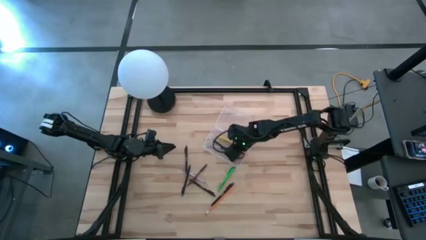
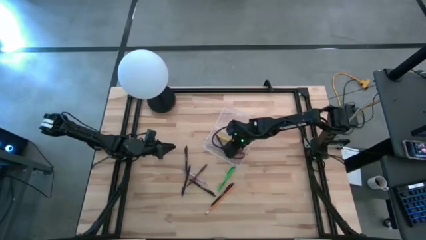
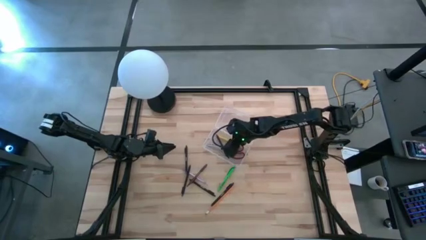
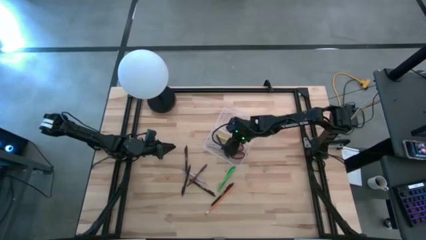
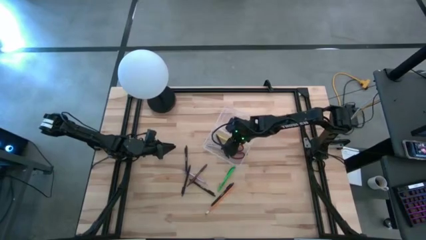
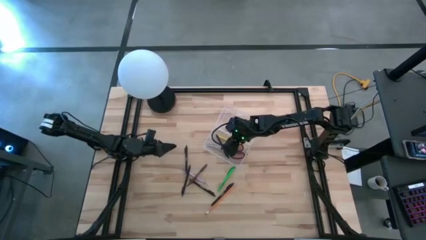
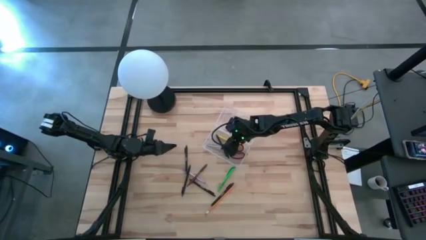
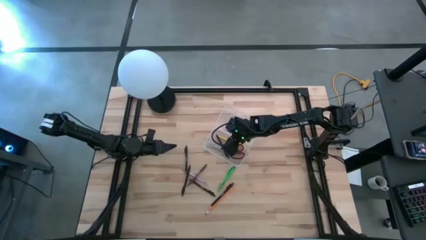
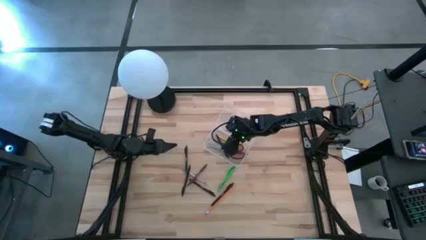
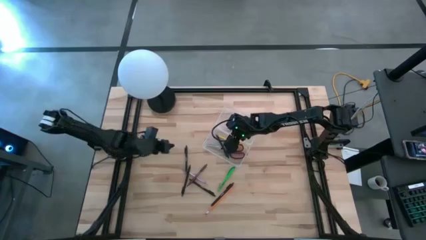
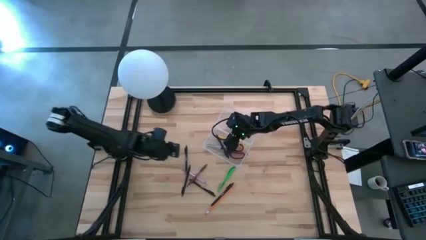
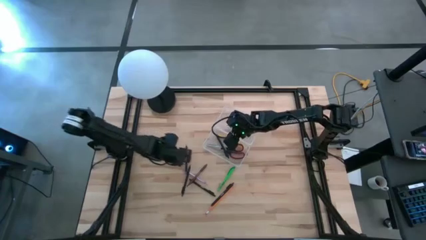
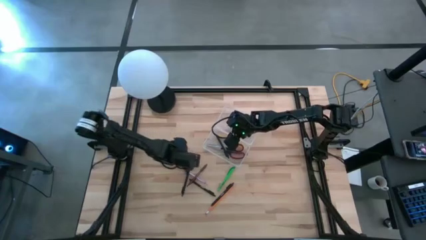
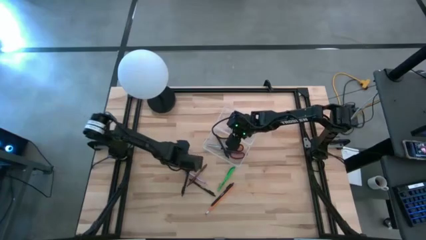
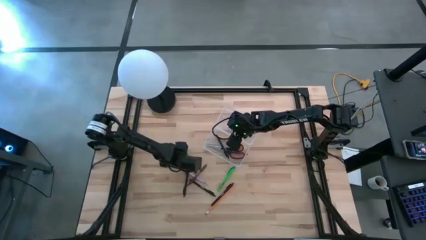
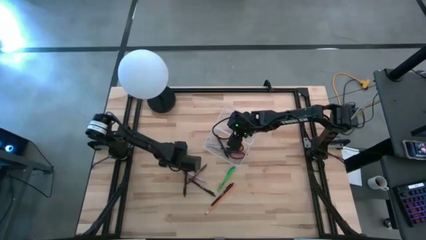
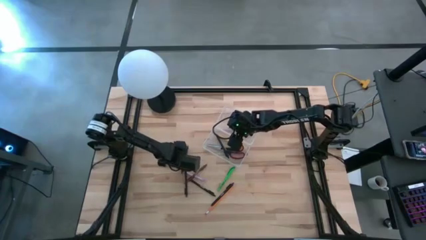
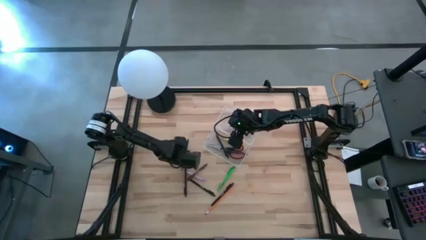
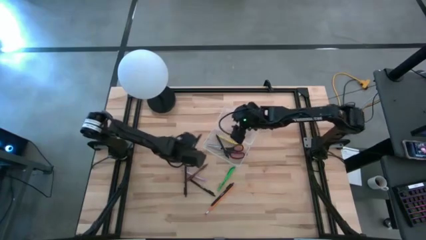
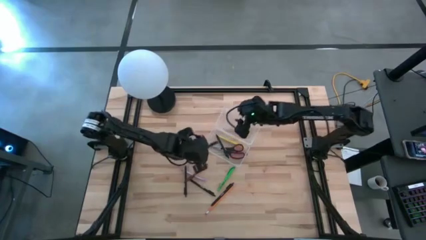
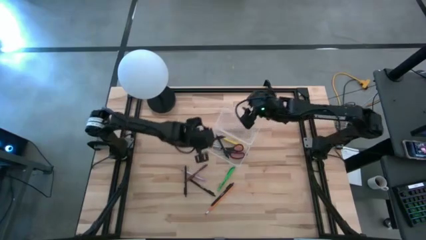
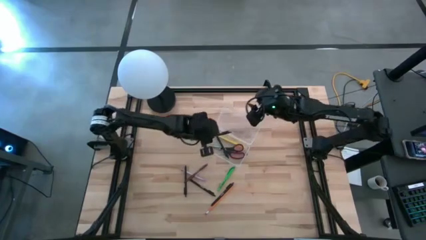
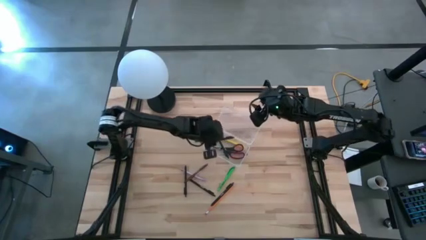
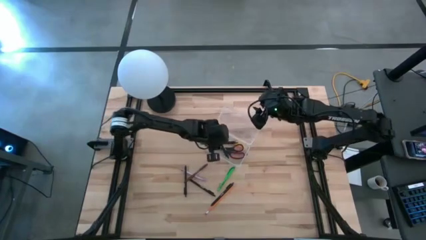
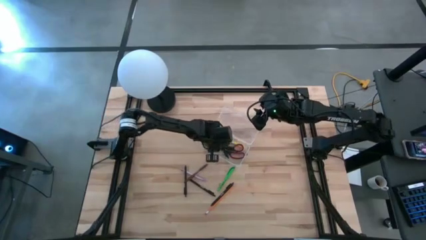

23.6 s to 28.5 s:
Task: Pick & place school supplies into a supply box
Put the black pen into the supply box

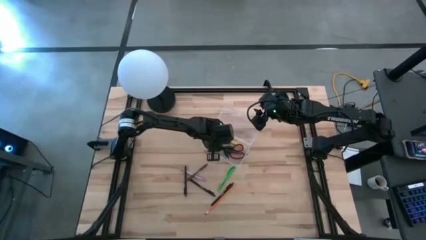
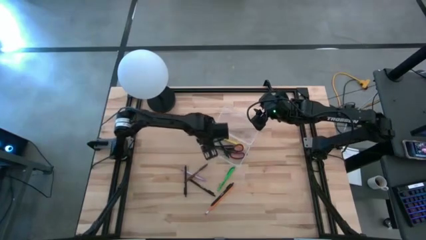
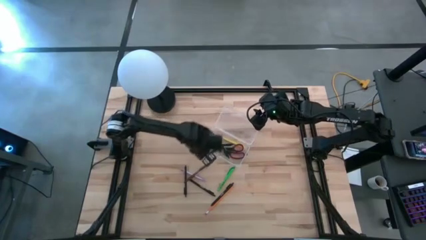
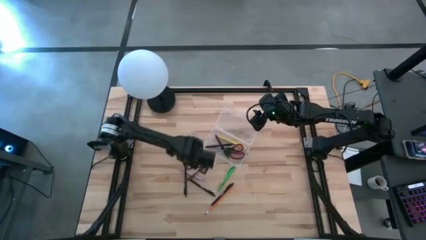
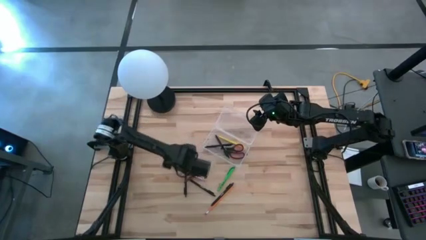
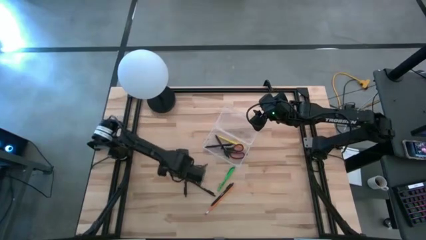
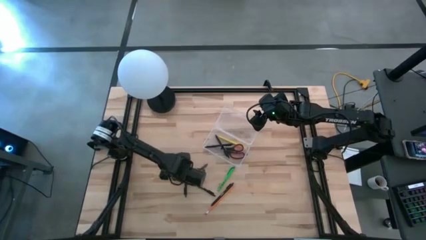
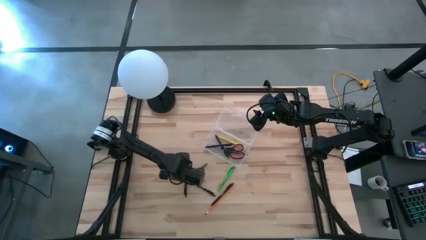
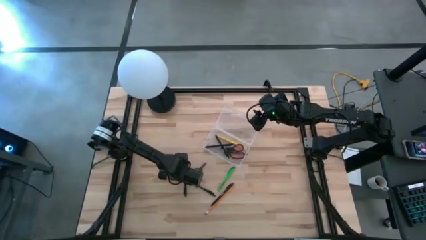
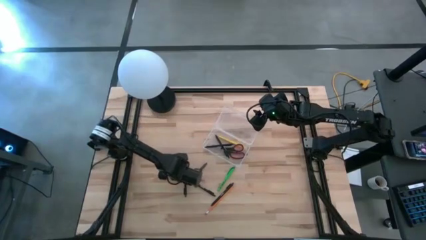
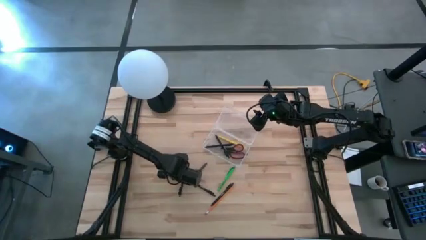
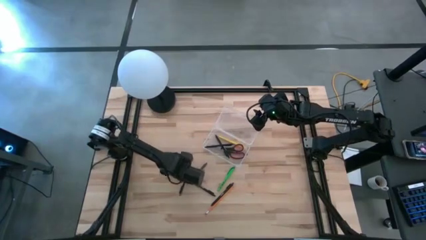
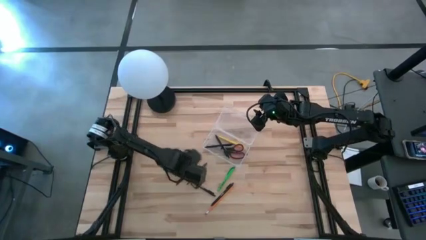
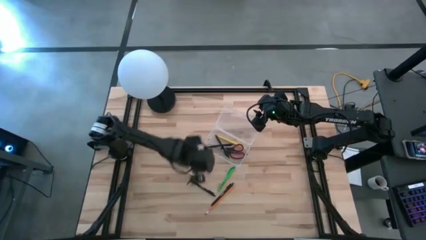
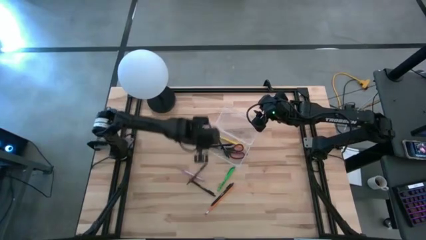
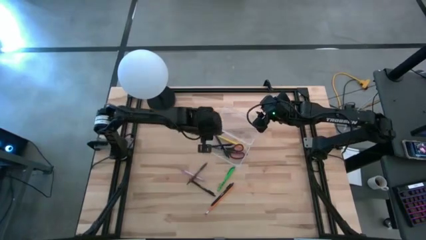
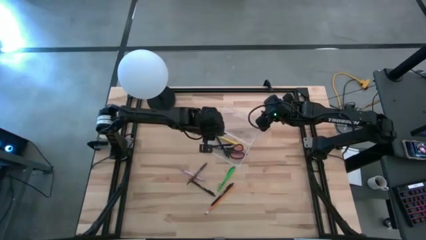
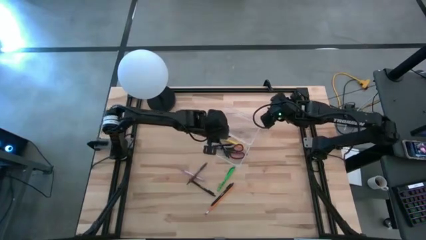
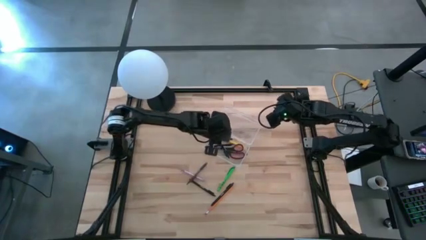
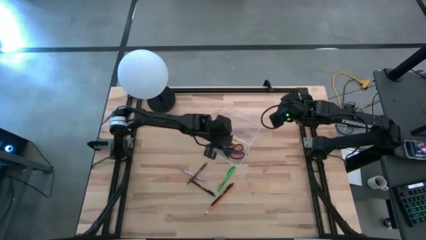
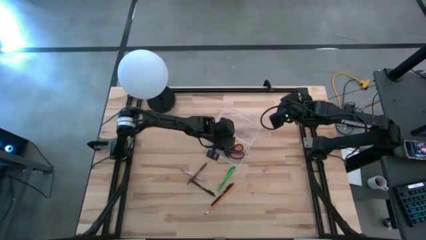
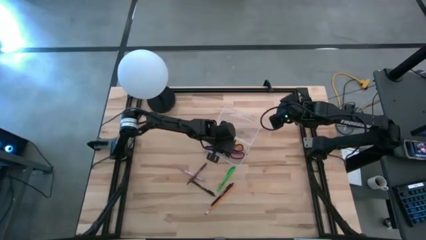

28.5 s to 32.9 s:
Put the black pen into the supply box

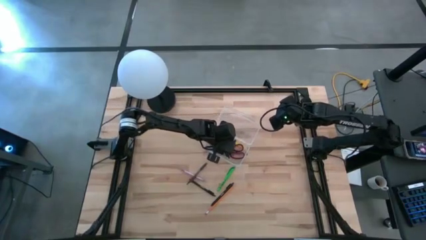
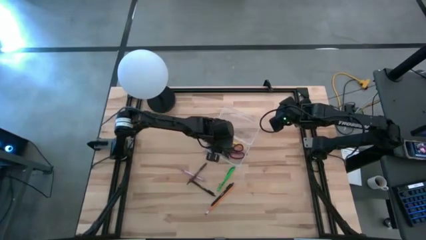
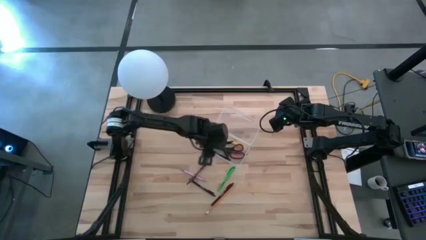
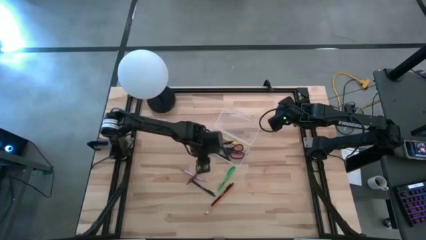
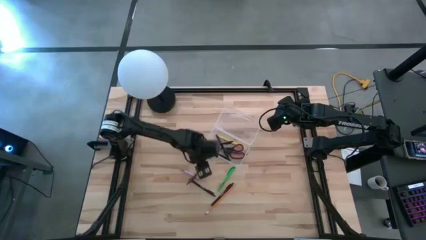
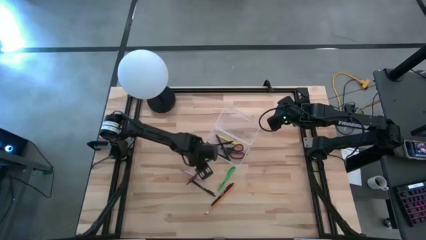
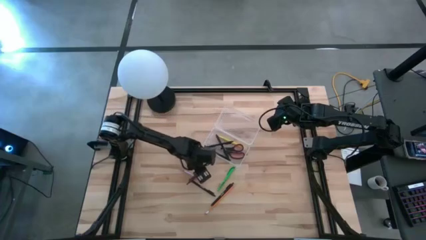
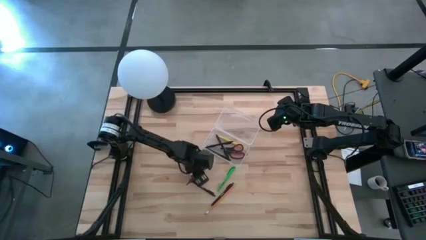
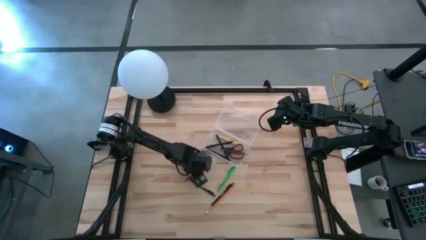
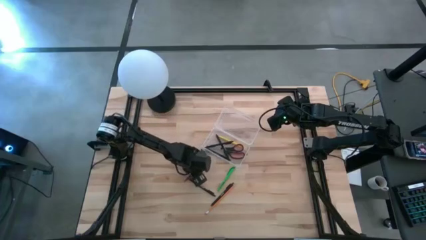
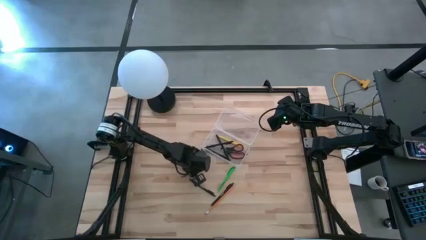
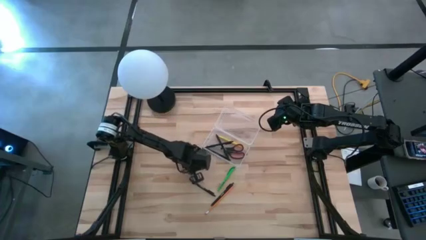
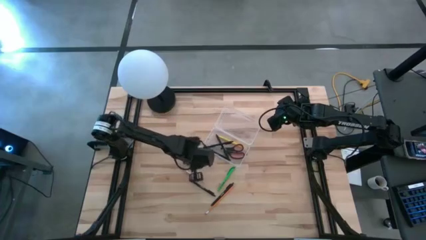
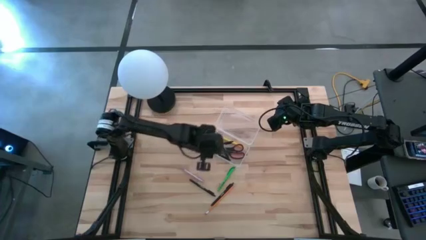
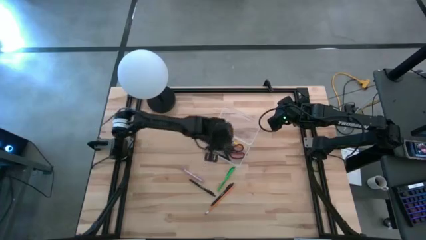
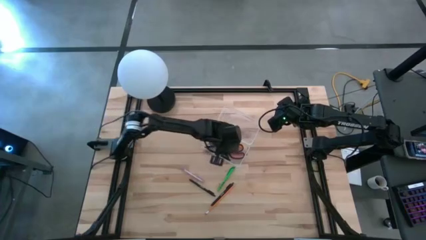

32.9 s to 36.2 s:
Put the brown pen into the supply box

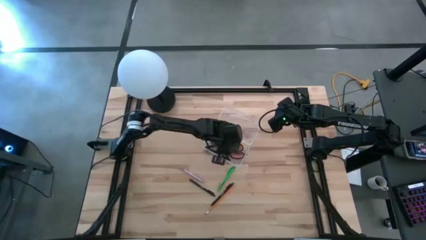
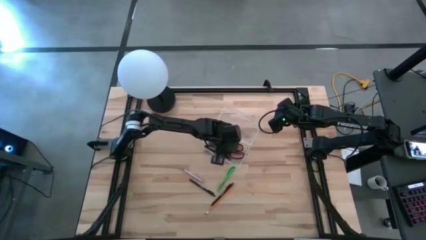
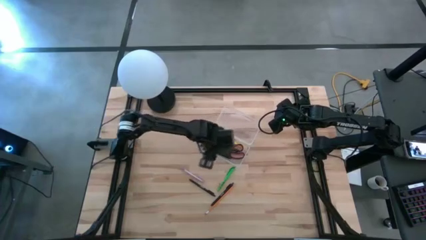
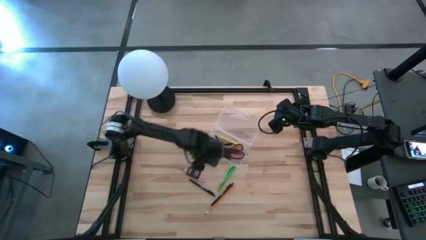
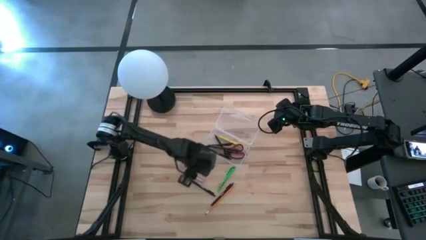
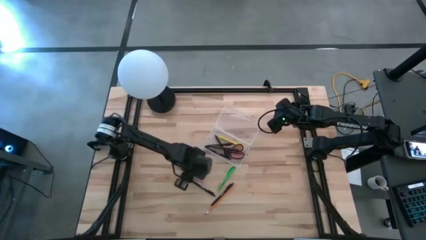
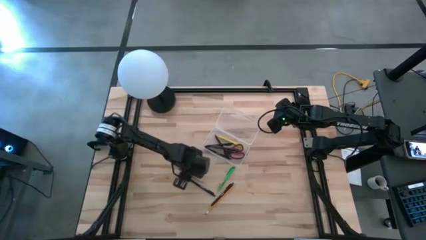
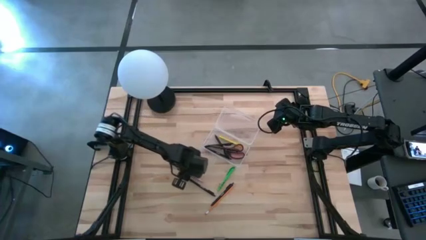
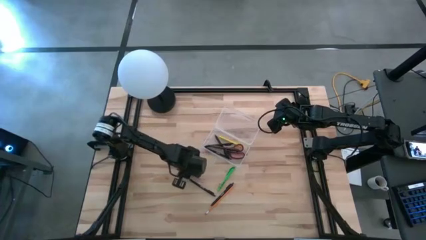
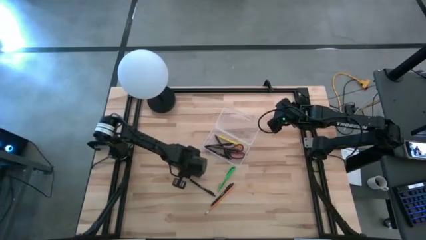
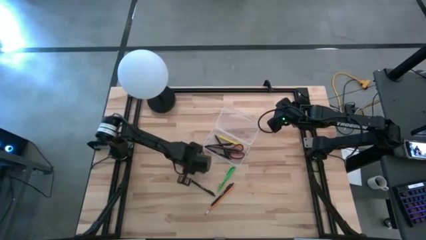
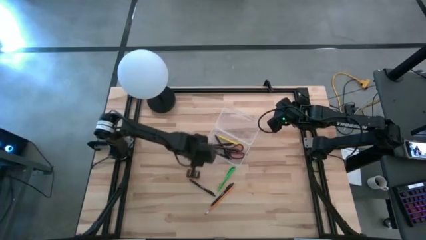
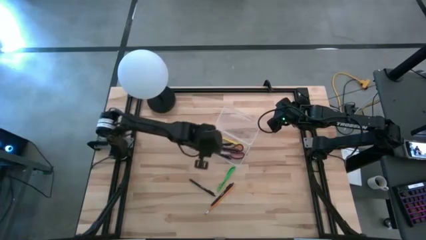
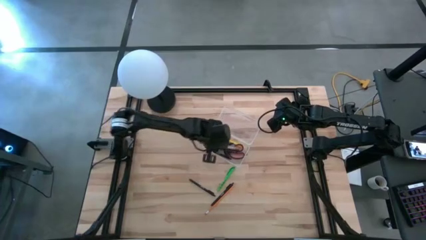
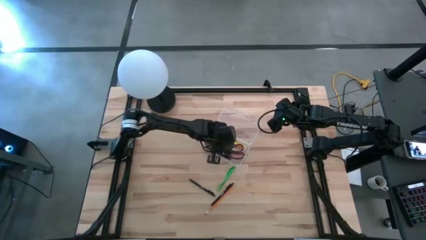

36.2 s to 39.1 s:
Put the purple pen into the supply box

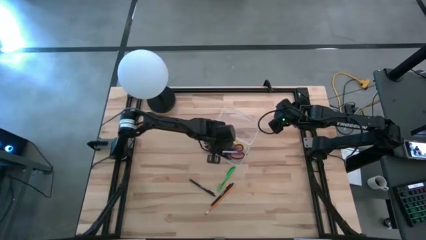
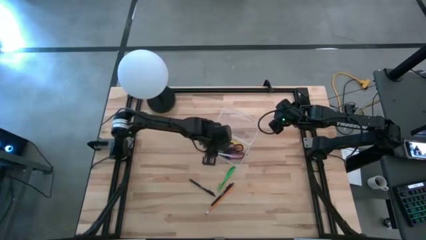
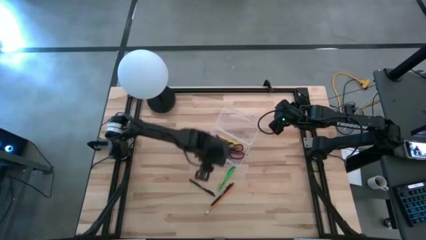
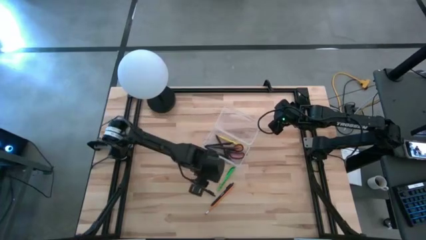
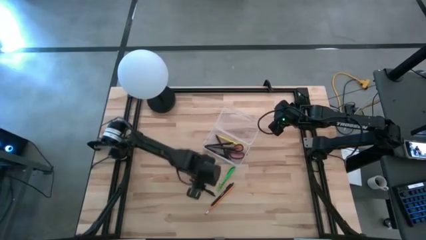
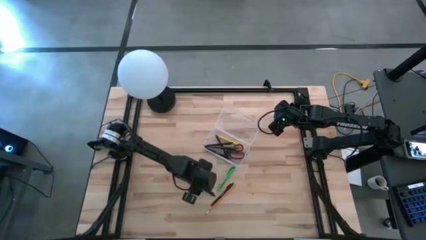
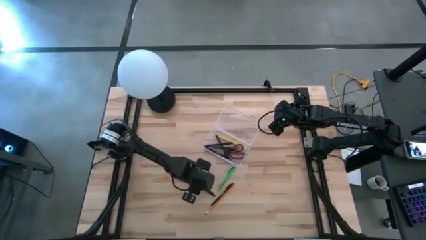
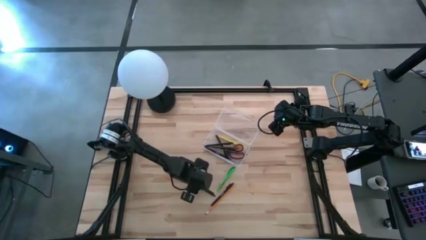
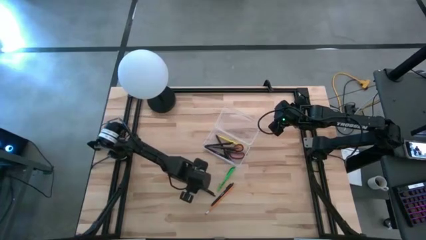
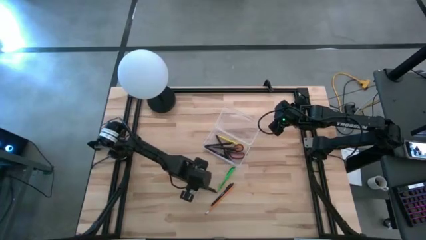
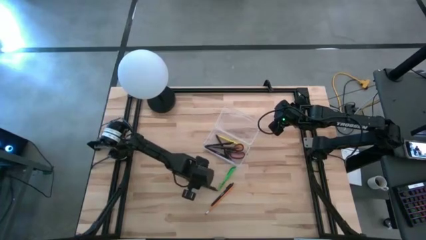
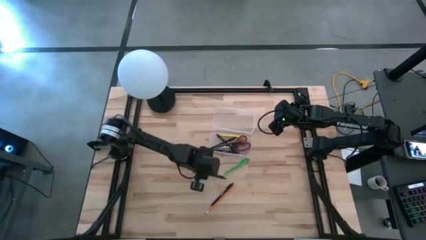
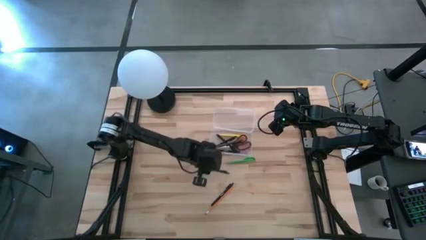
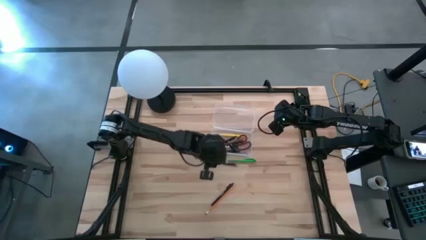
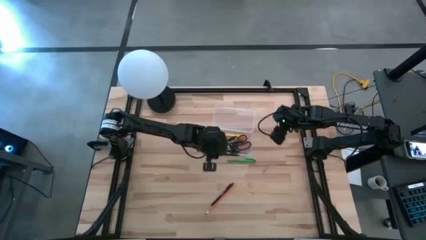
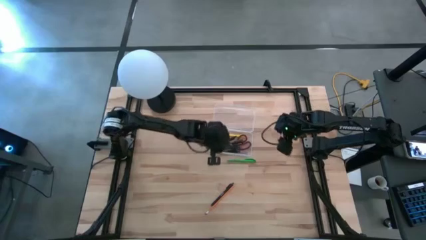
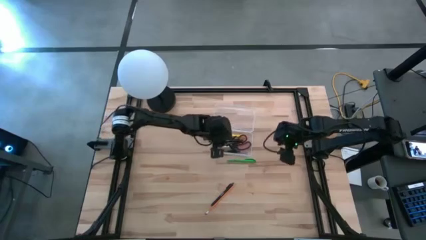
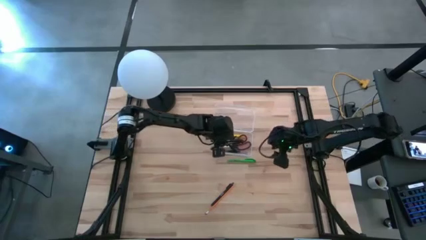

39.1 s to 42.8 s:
Put the black pen into the supply box
